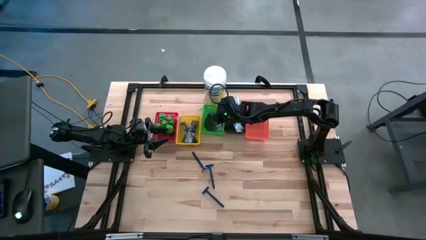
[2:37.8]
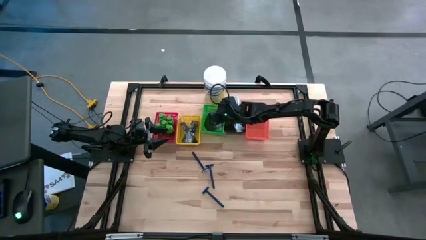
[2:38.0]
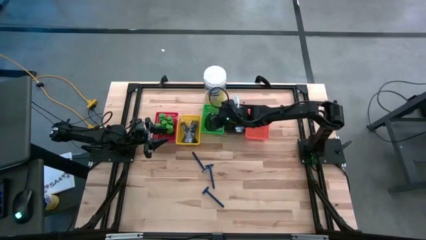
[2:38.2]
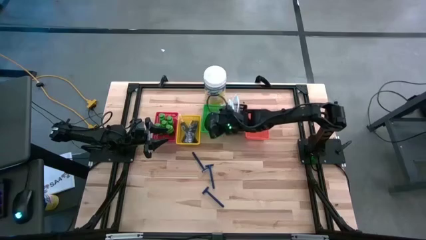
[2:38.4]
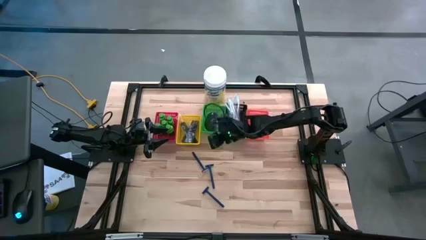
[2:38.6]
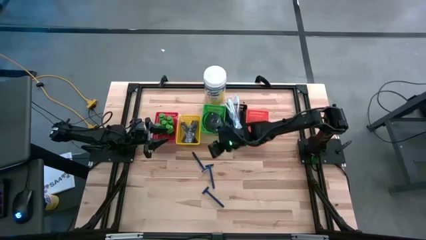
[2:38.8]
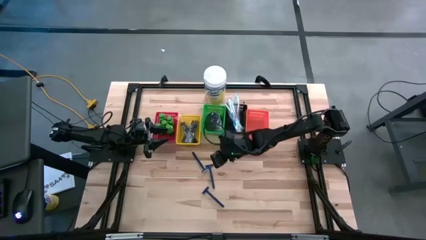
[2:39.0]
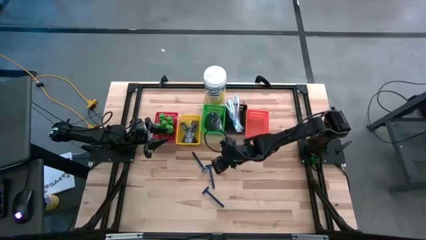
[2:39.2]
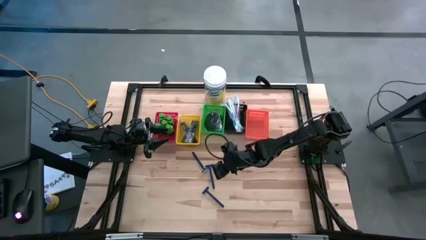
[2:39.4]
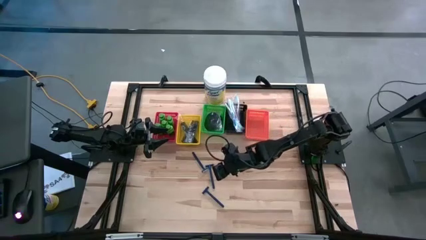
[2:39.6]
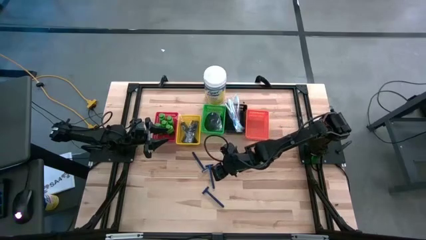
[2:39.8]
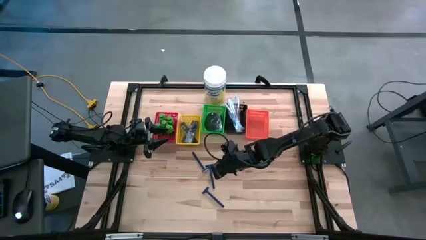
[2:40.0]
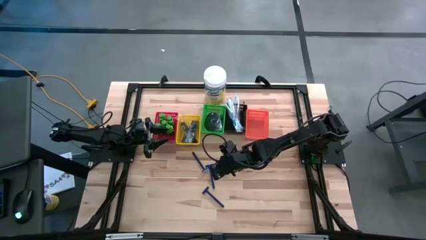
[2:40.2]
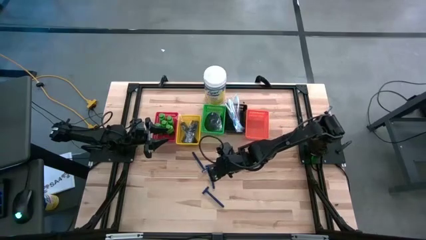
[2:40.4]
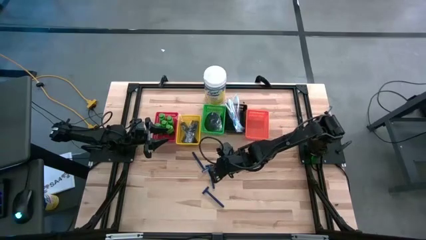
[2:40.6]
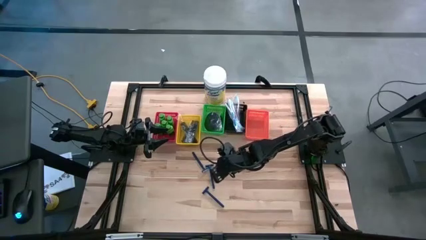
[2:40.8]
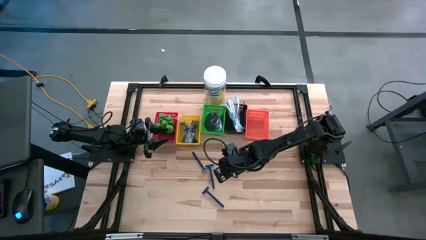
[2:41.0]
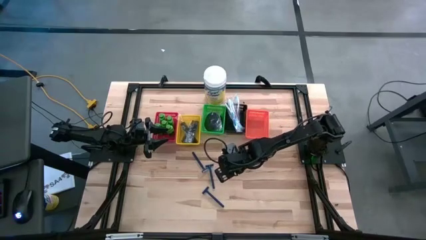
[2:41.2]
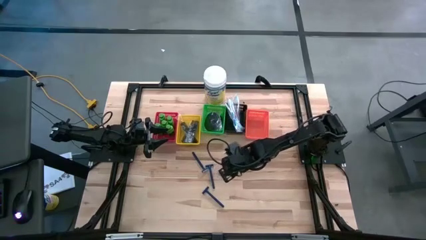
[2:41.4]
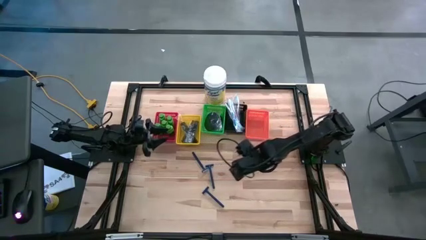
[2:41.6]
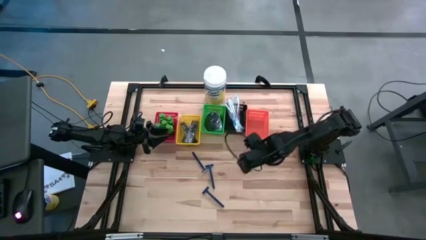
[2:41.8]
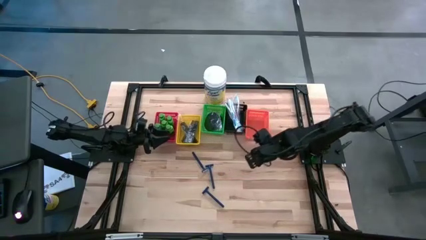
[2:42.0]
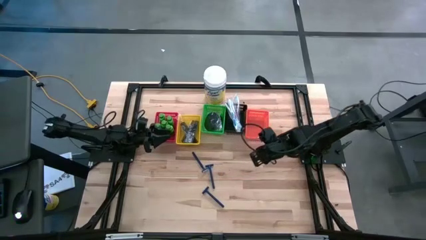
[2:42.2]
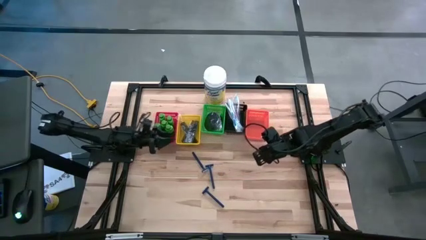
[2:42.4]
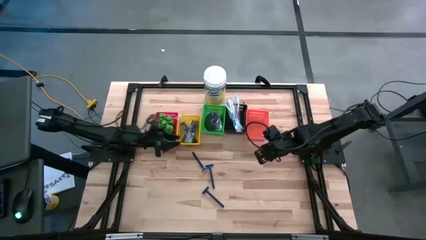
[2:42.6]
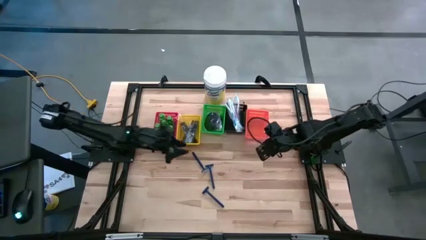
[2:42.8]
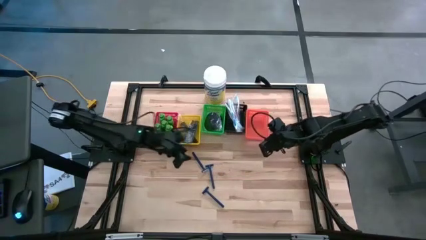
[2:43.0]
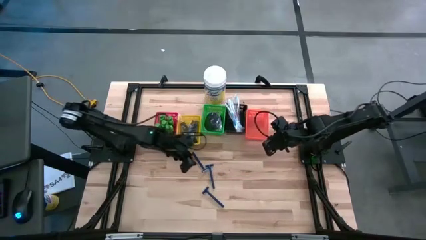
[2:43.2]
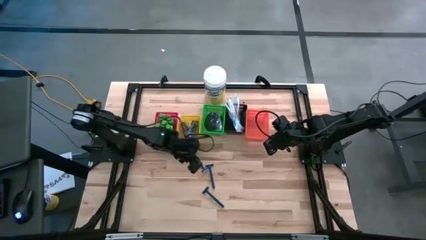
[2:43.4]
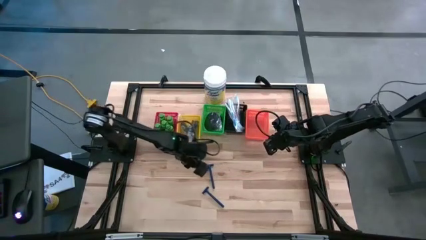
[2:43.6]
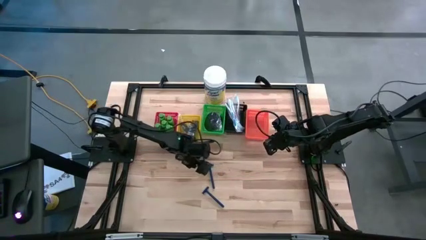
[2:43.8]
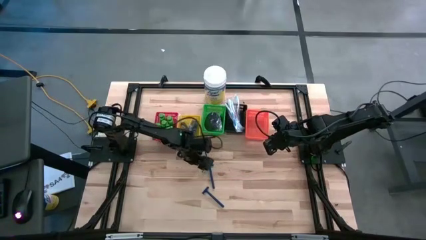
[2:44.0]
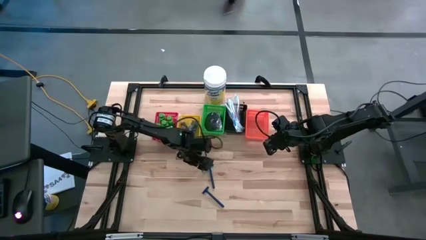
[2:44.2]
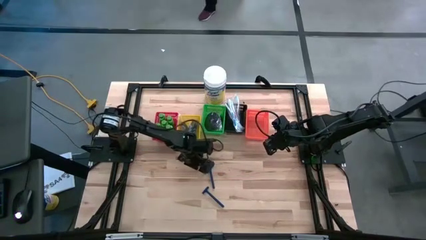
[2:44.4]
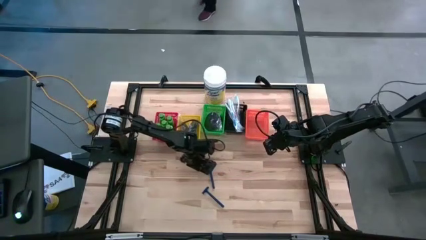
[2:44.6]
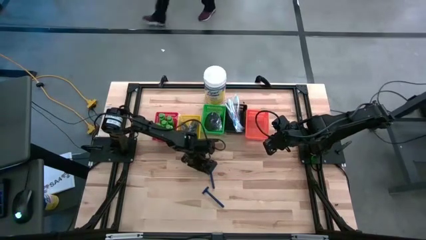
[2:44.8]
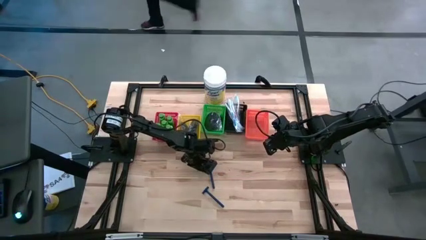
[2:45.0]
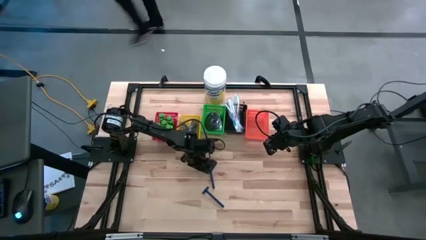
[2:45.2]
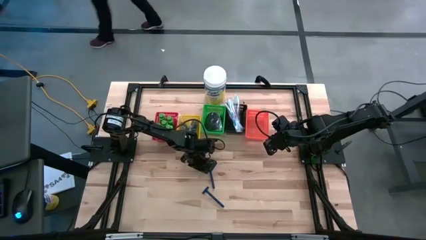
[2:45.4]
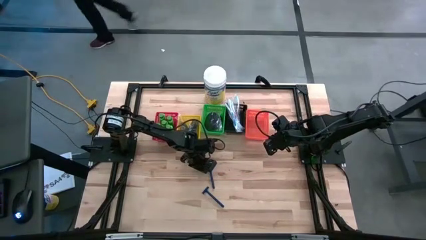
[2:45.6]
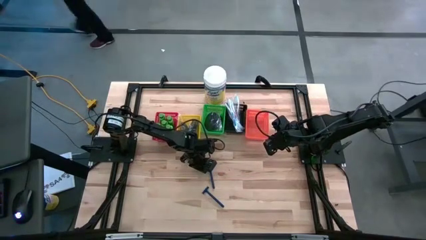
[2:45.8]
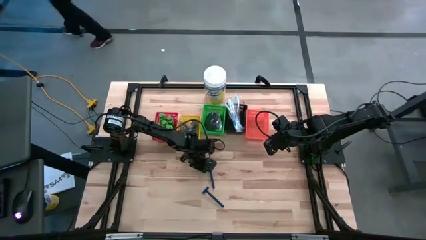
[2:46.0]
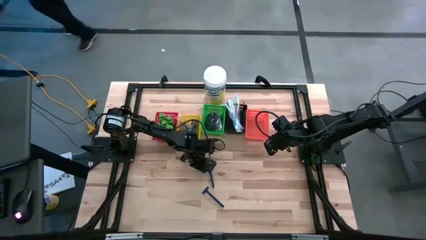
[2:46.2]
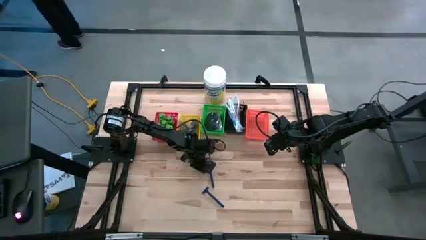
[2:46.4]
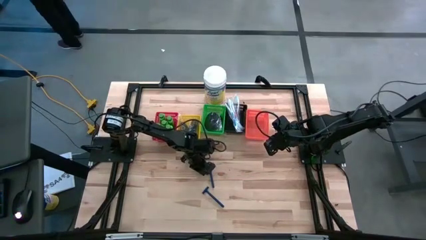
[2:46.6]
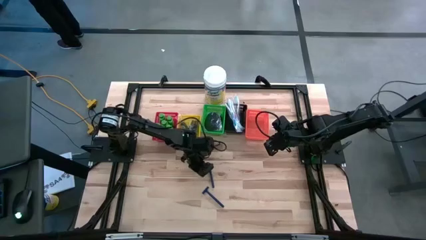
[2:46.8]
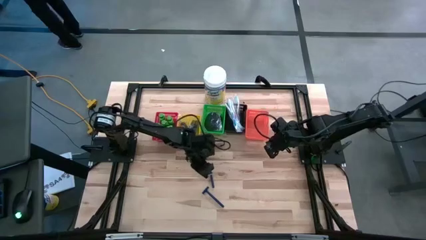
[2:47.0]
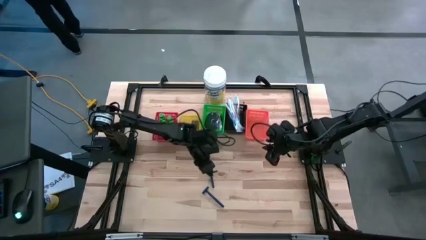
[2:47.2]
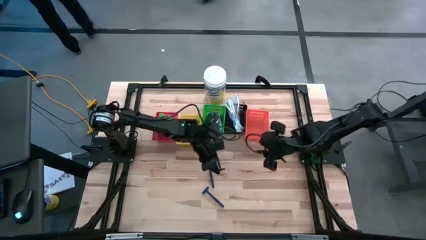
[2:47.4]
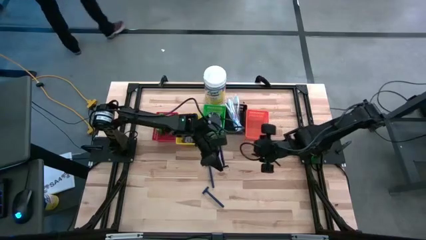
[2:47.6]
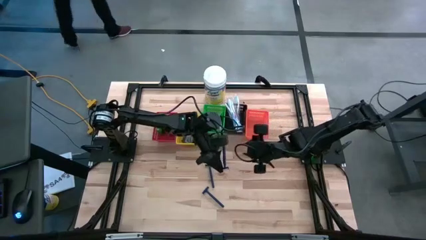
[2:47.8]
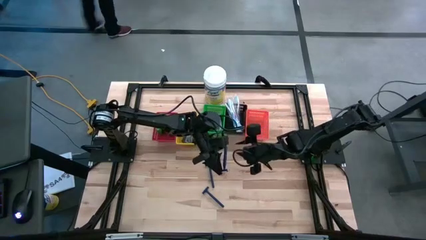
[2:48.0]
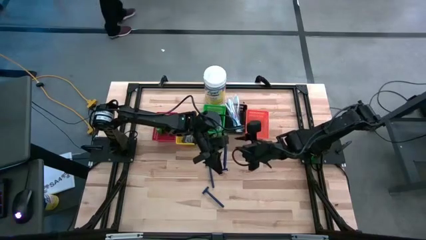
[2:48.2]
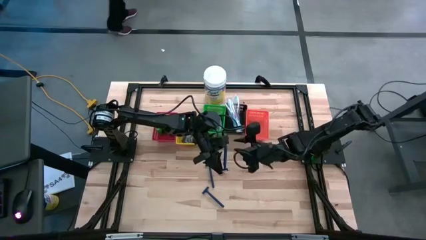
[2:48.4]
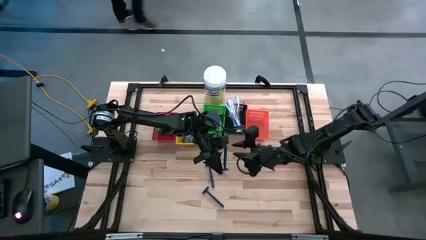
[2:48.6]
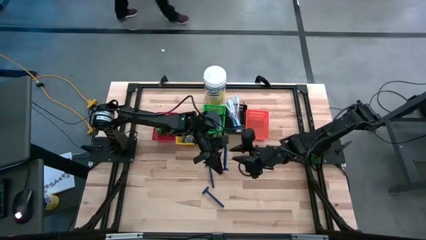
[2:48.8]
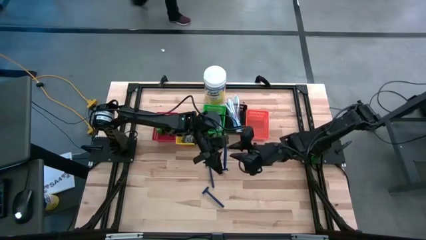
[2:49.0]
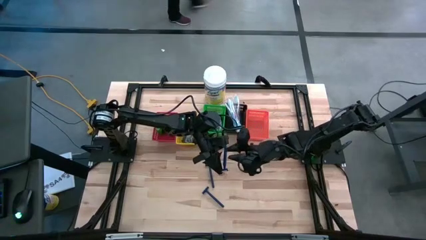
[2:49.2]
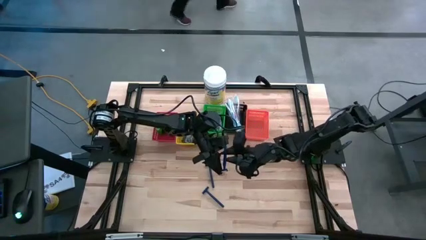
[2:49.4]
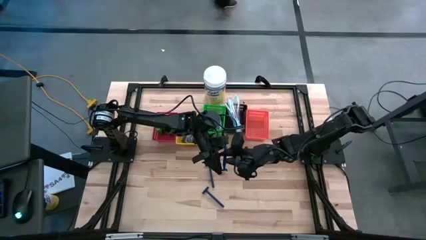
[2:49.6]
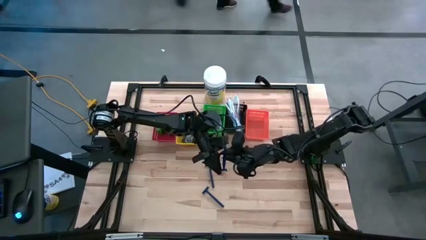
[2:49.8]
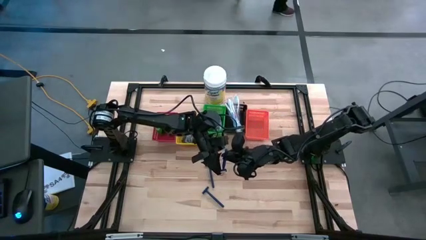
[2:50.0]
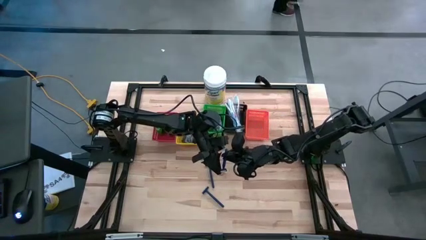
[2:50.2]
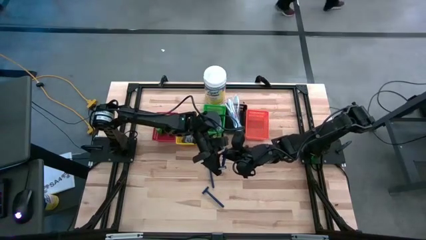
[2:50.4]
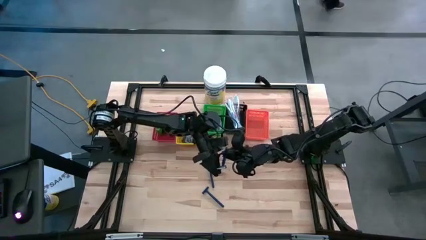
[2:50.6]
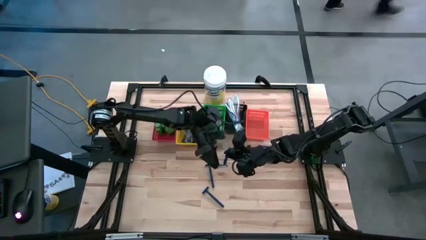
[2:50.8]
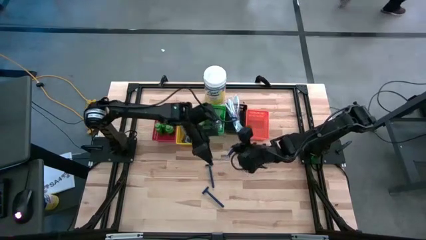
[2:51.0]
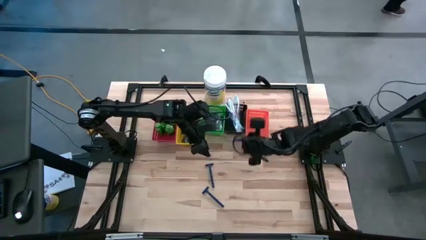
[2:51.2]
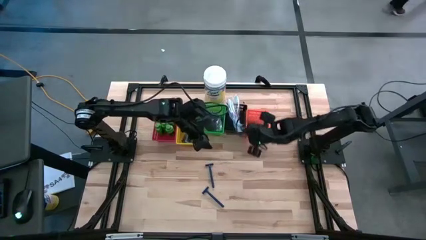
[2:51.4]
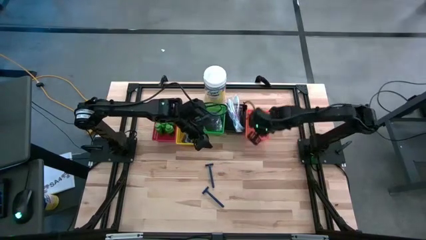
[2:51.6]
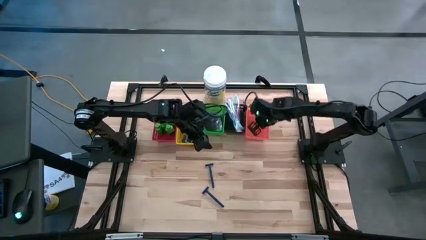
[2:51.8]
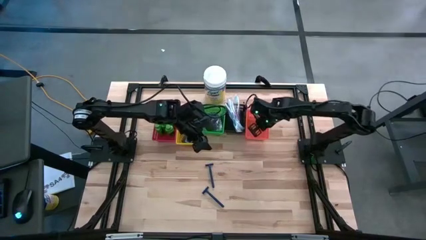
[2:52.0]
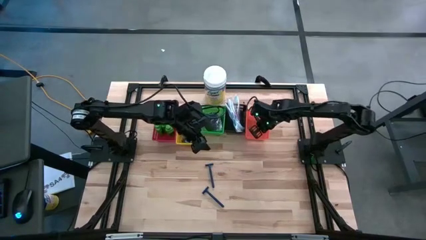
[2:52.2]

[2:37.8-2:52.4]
Task: Pick & Place Travel size toiletries
Put the blue razor into the orange bin

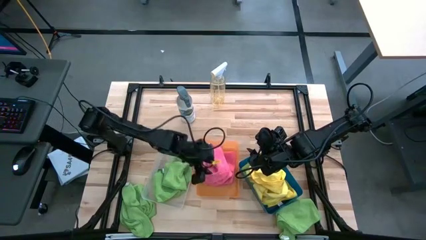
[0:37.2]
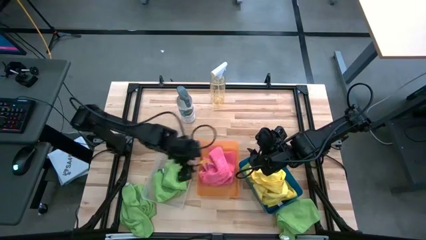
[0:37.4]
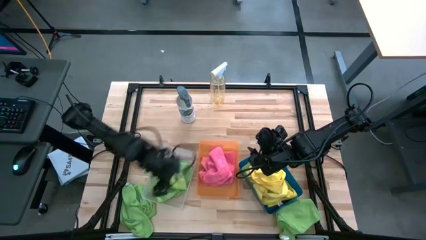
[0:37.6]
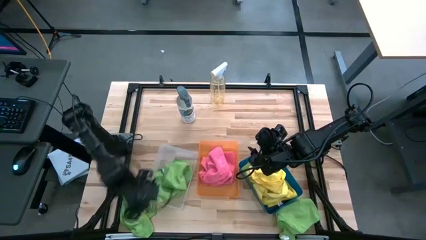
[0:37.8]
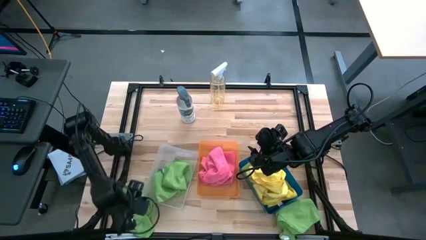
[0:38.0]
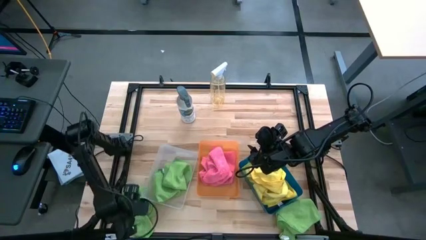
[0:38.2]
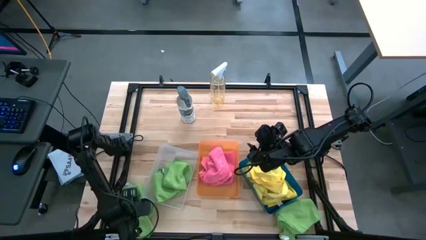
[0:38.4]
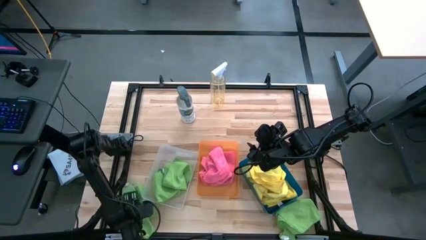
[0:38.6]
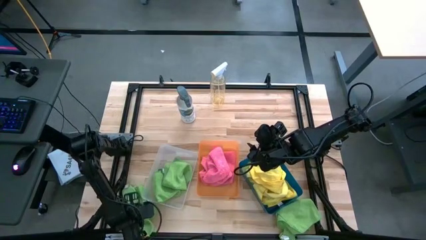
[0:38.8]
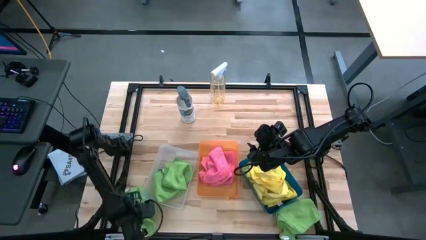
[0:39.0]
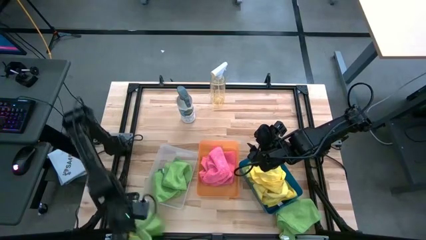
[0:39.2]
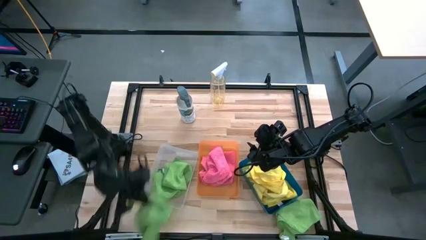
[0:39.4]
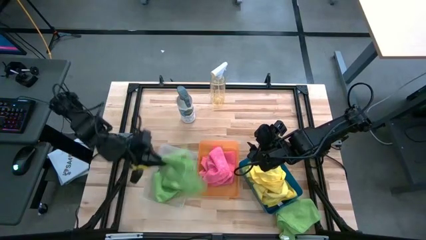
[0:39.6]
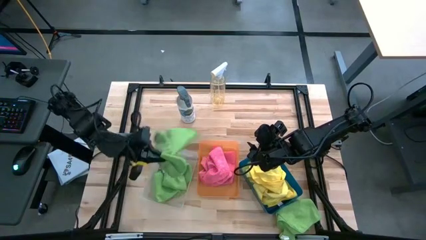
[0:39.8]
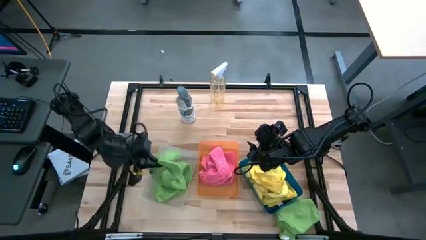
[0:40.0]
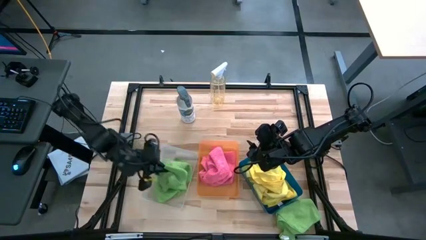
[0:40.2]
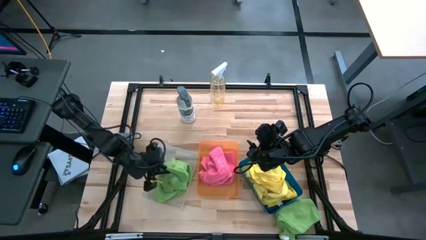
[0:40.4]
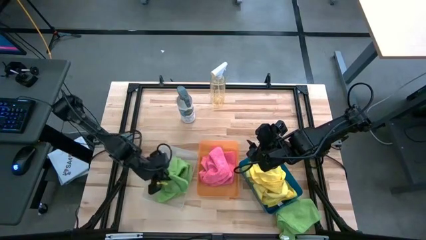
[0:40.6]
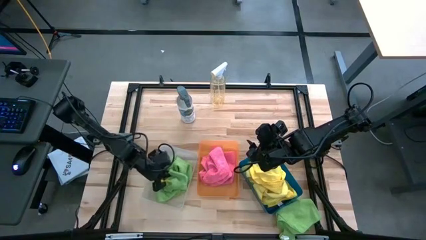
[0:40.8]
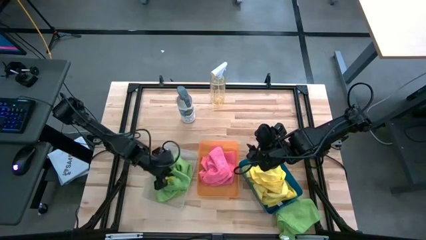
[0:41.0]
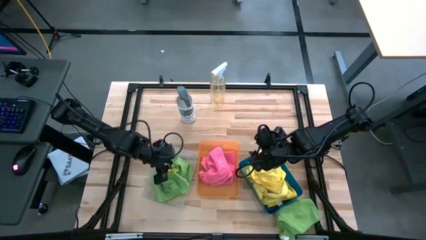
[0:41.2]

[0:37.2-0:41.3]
Task: Sort microfiber towel by color & place in baskets
Put the left green microfiber cloth into the transparent bin
